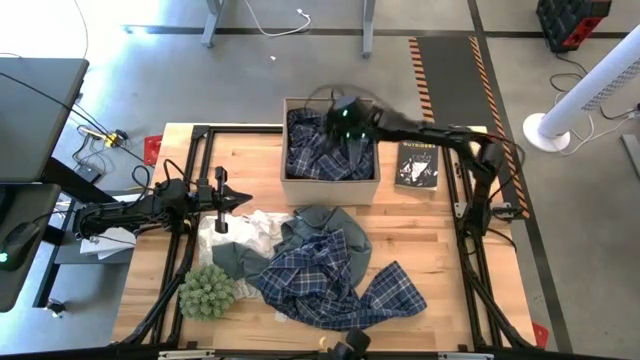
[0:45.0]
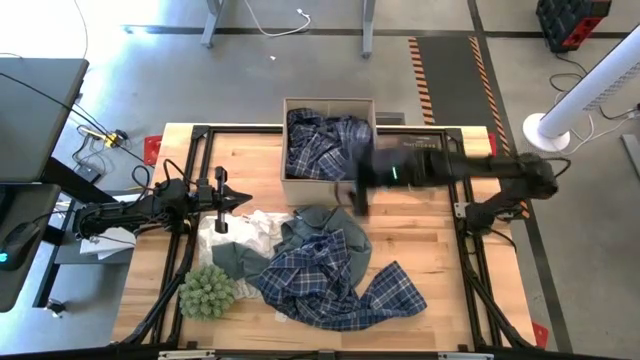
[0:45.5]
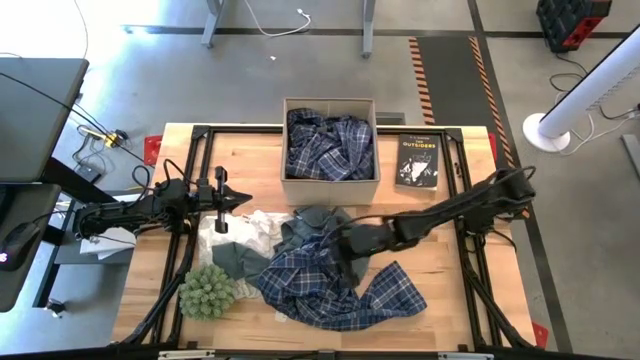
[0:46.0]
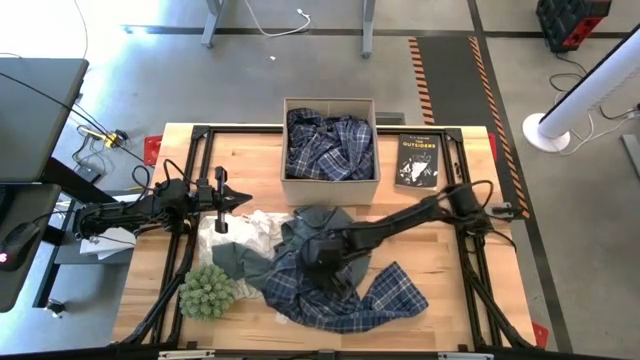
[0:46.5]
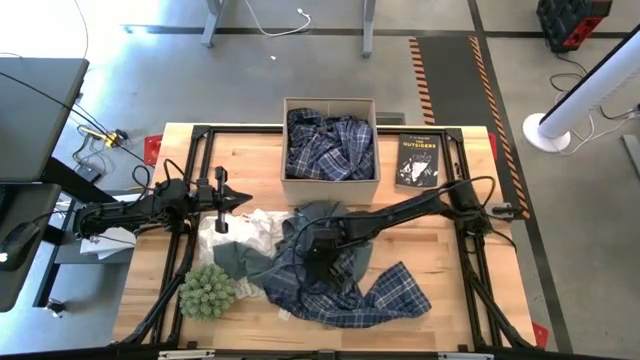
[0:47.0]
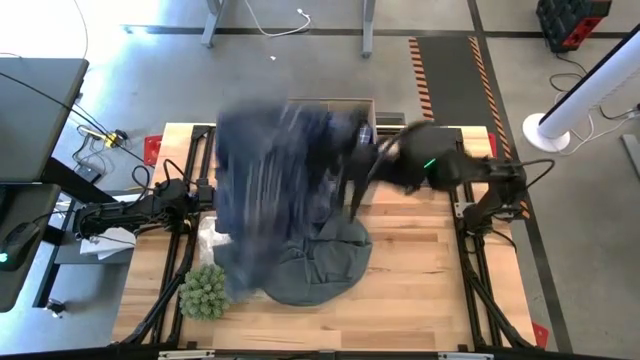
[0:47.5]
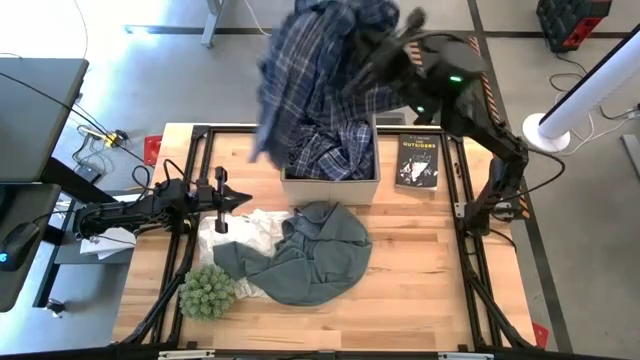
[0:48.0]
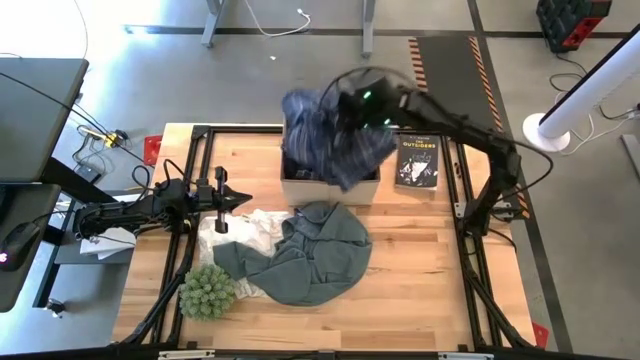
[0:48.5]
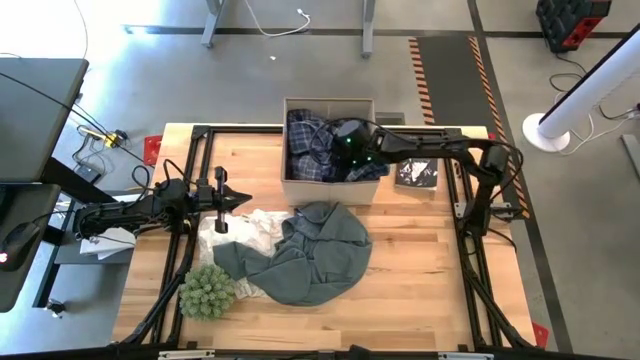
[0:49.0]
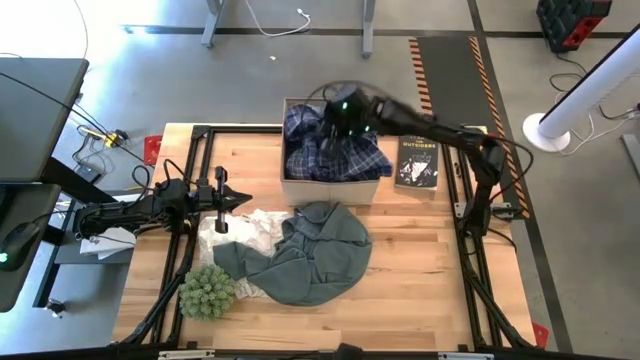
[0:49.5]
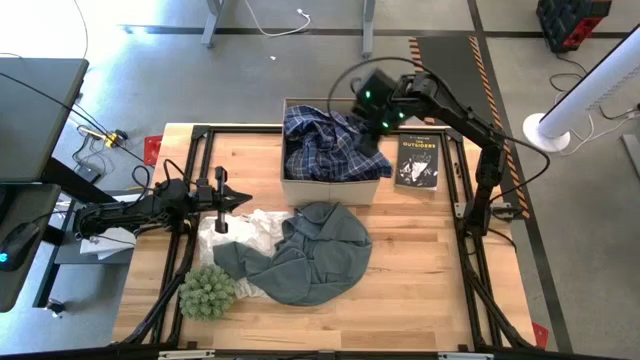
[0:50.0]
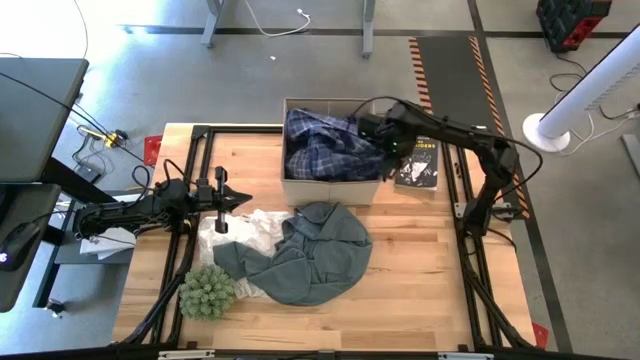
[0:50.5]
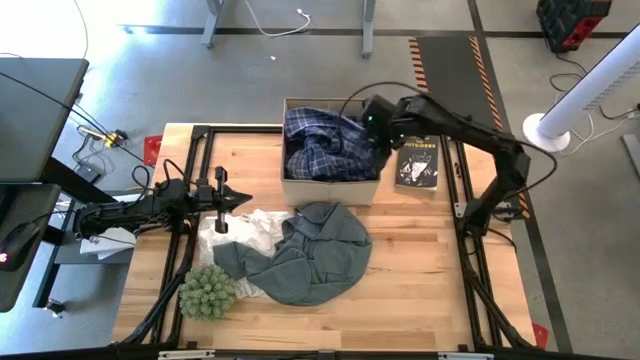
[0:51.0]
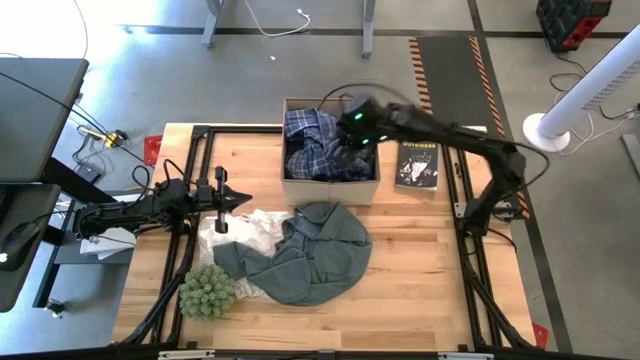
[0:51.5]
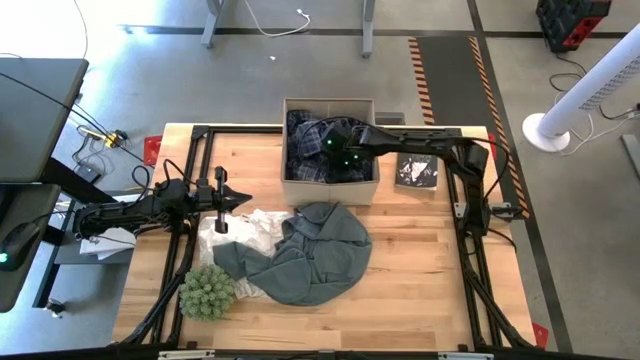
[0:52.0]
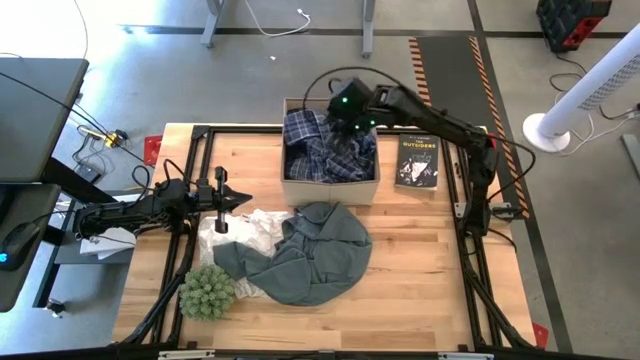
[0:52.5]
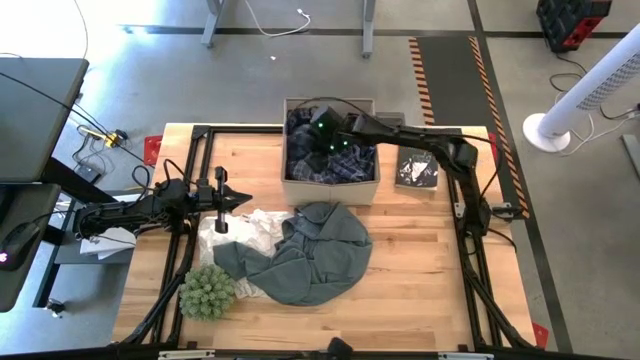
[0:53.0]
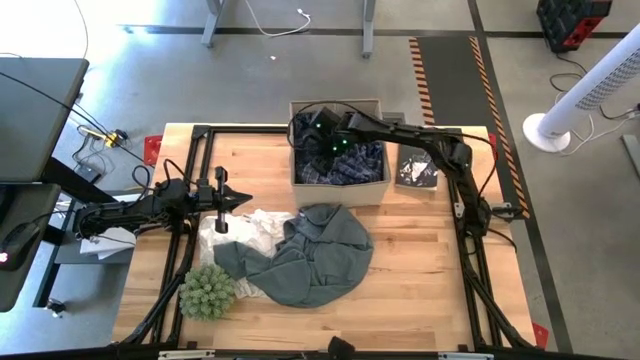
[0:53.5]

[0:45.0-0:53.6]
Task: Sort clothes
Put the blue long sleeve polo into the white bin

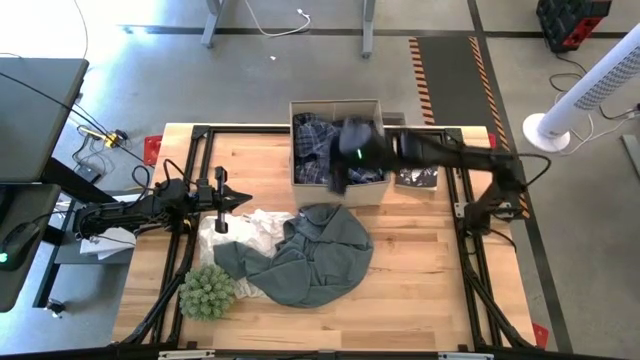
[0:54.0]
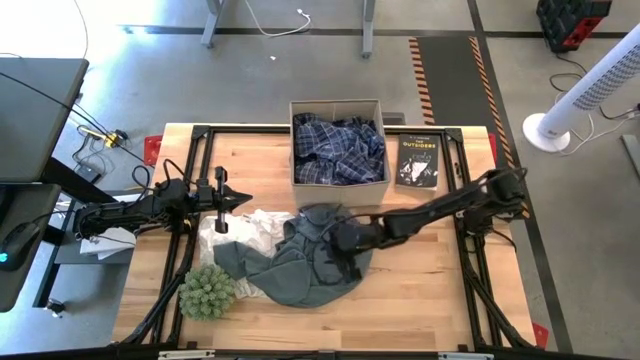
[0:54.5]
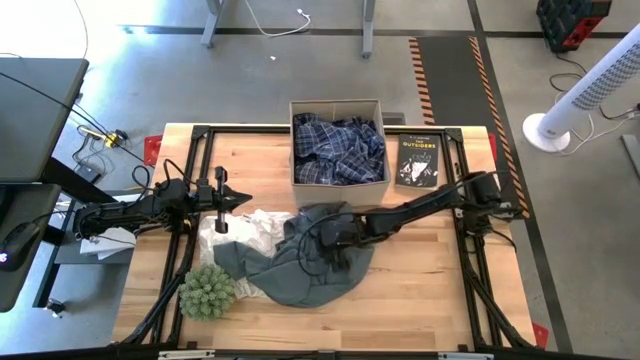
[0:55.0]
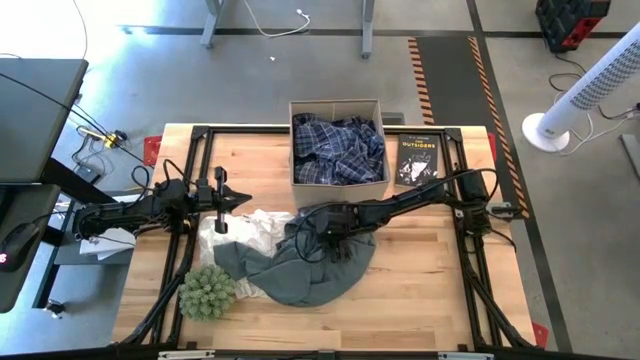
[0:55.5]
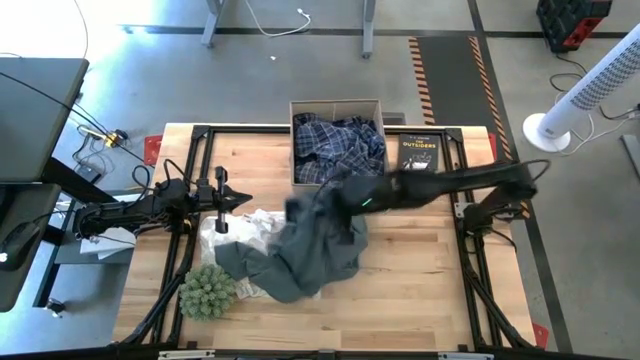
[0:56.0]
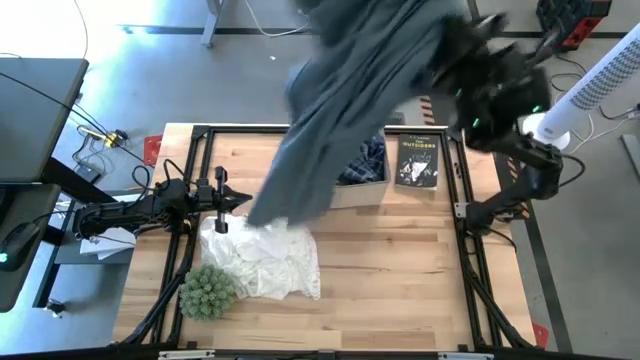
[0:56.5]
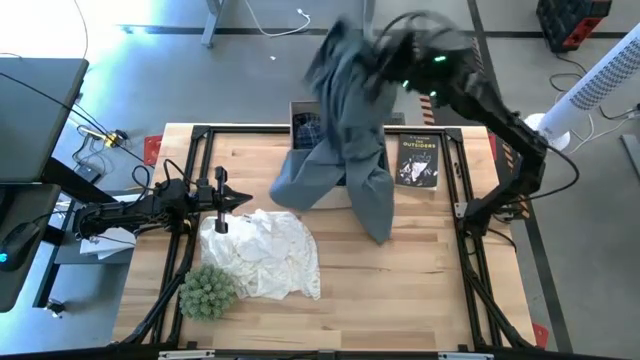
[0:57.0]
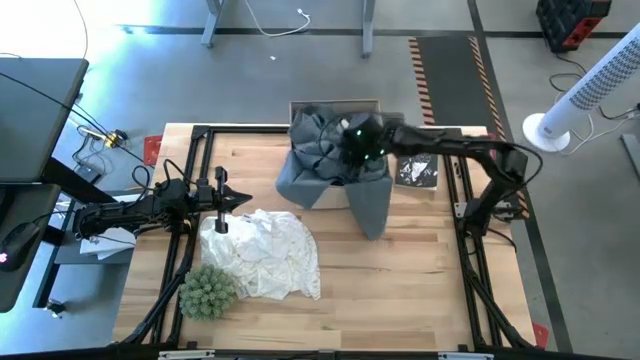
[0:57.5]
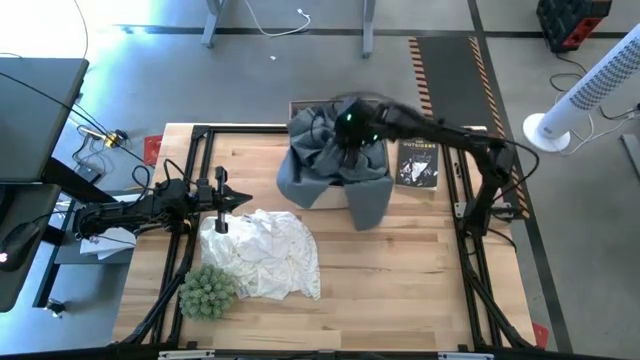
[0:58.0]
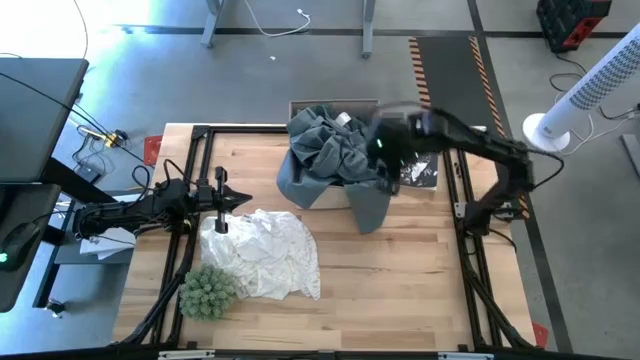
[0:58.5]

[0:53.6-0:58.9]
Put the gray pants into the white bin

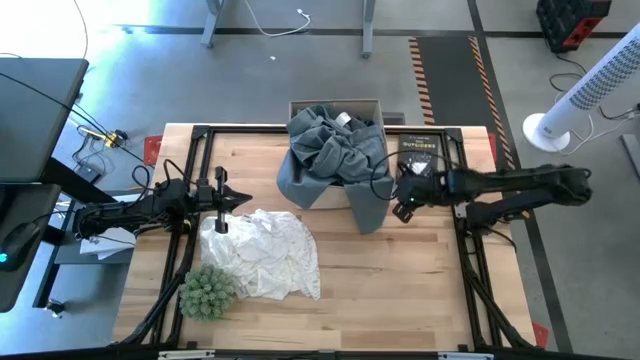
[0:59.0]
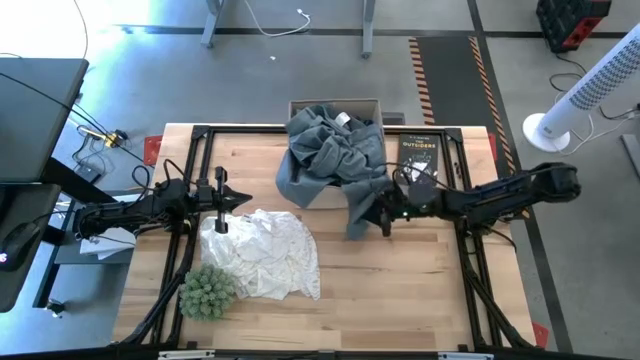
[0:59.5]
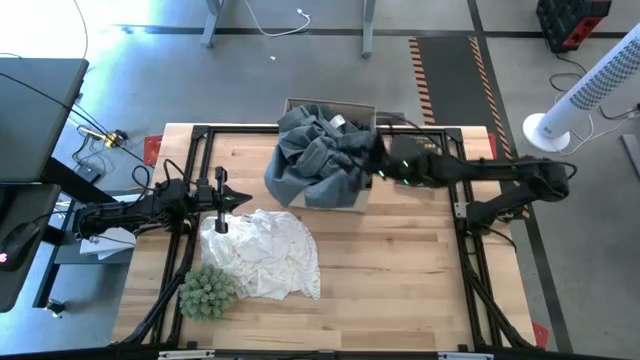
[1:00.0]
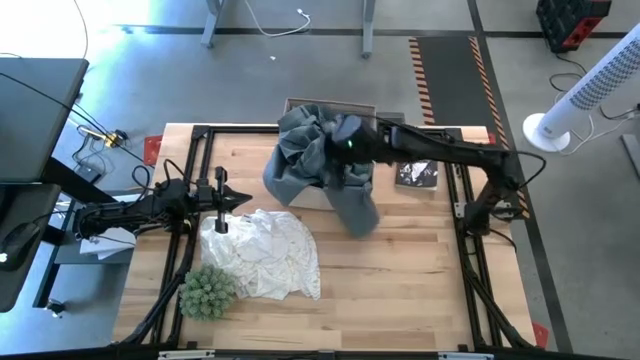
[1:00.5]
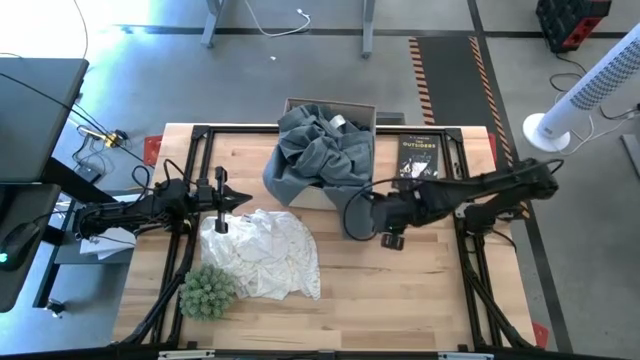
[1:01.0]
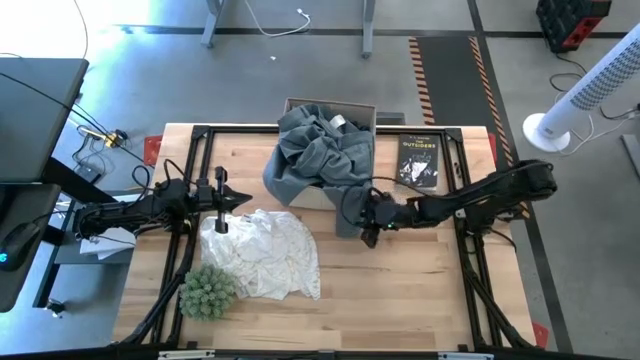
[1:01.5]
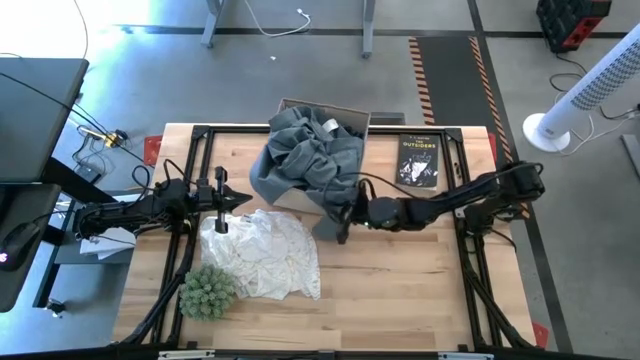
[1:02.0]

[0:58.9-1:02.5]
Put the gray pants into the white bin

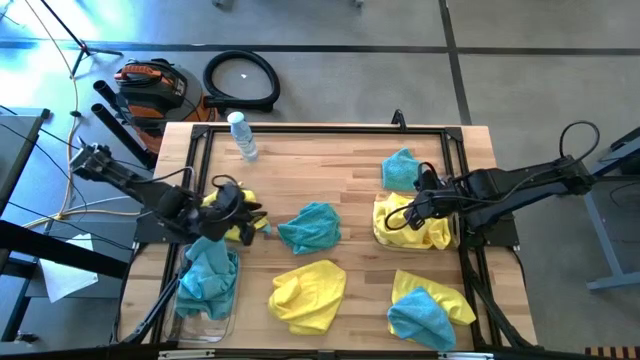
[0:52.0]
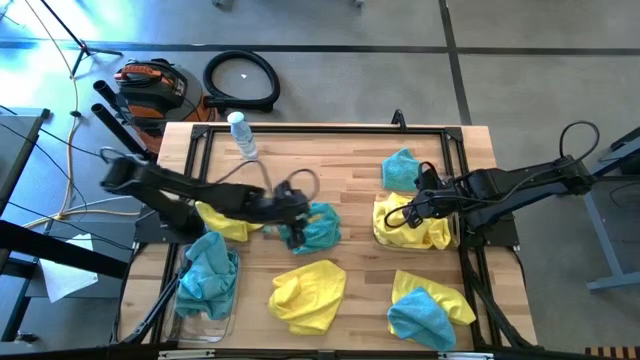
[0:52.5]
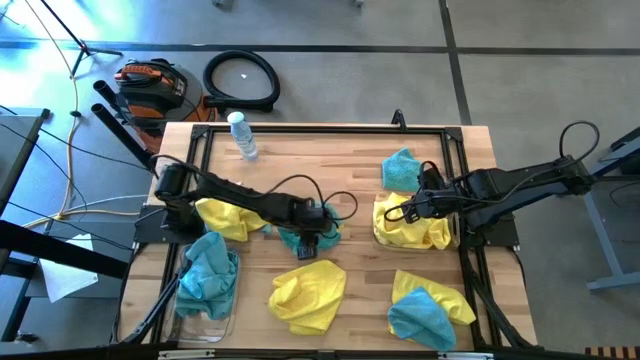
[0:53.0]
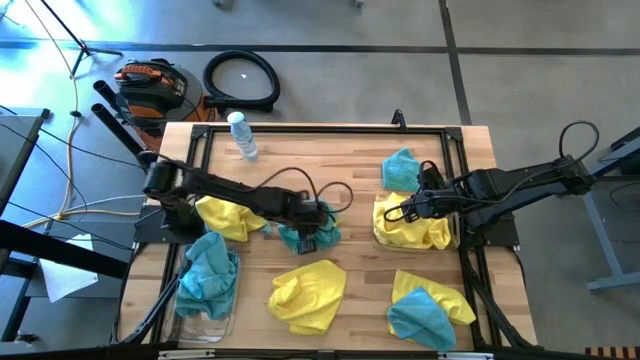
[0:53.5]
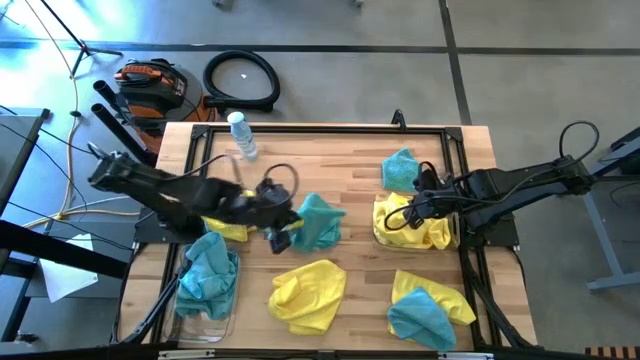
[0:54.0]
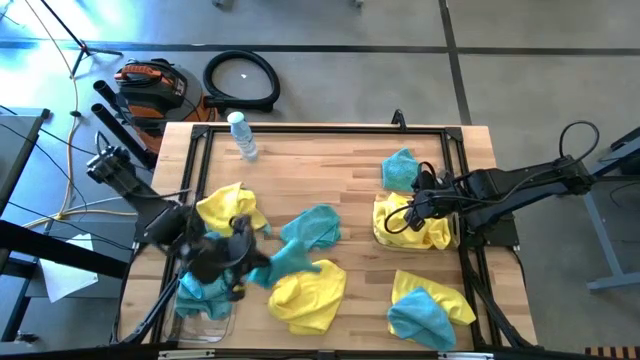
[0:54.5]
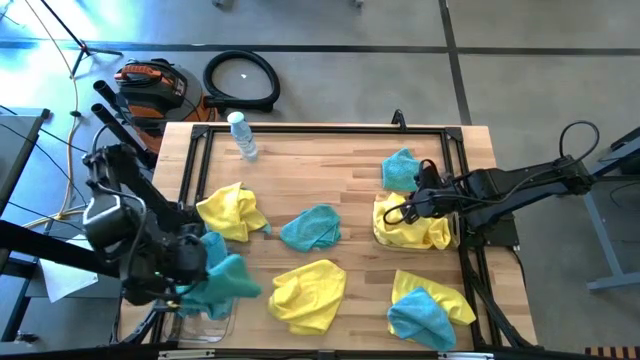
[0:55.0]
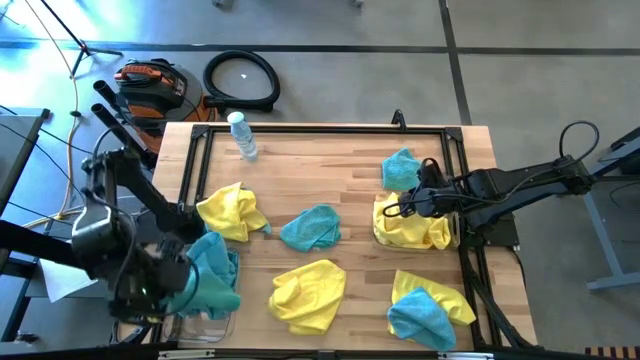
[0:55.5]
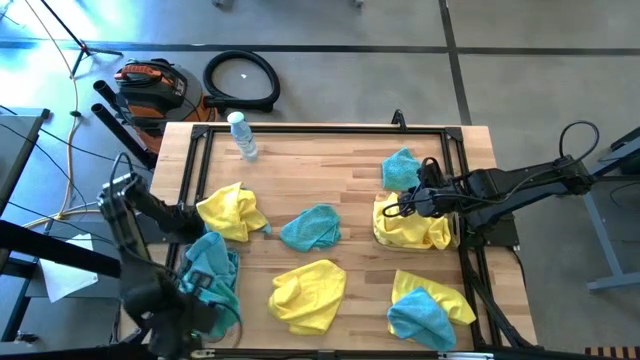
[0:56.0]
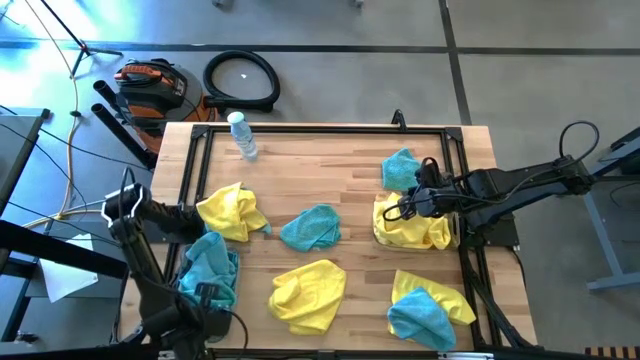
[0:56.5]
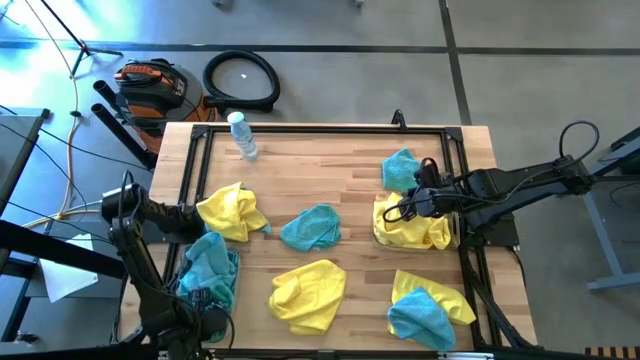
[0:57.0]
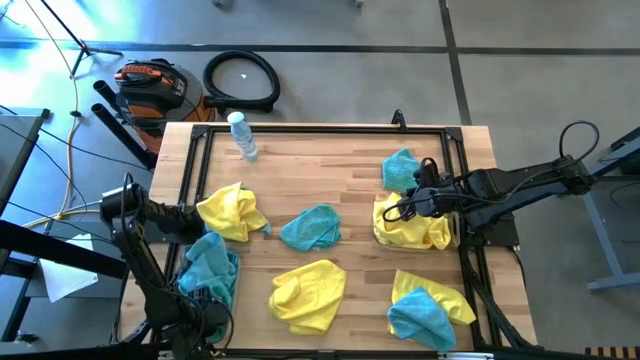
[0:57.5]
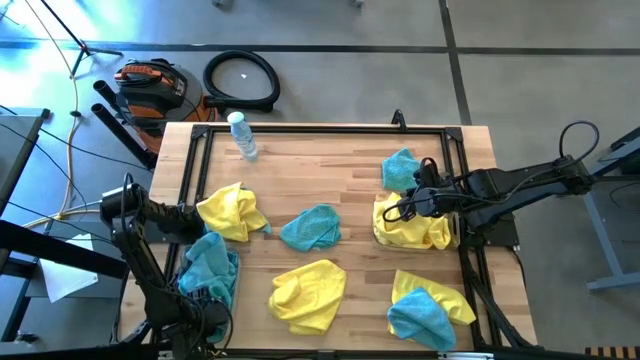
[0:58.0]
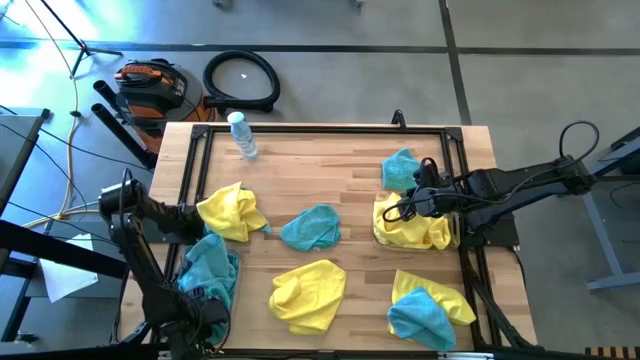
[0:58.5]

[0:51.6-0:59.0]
Task: Sort microfiber towel by color & place in baskets
Put the blue microfiber towel into the left transparent bin
